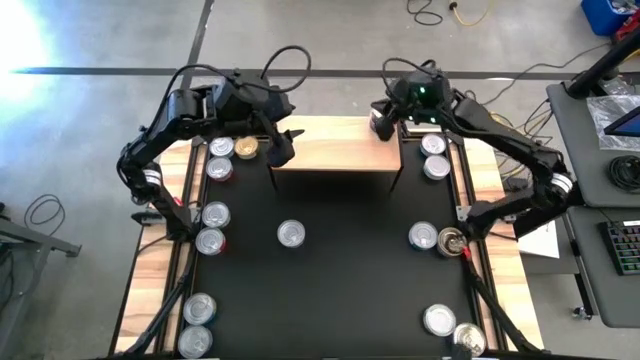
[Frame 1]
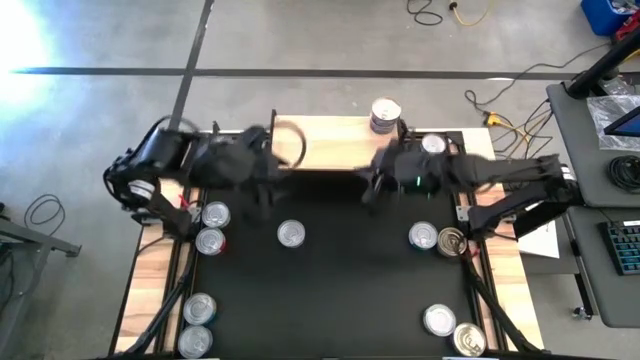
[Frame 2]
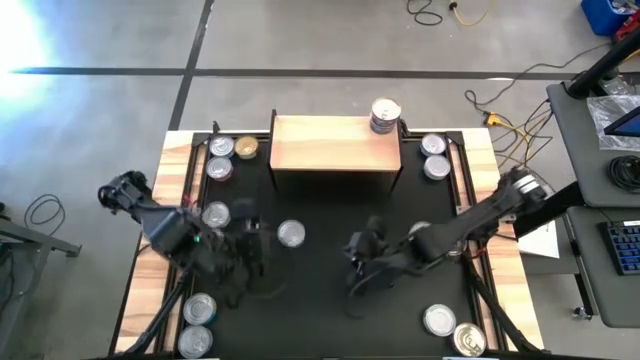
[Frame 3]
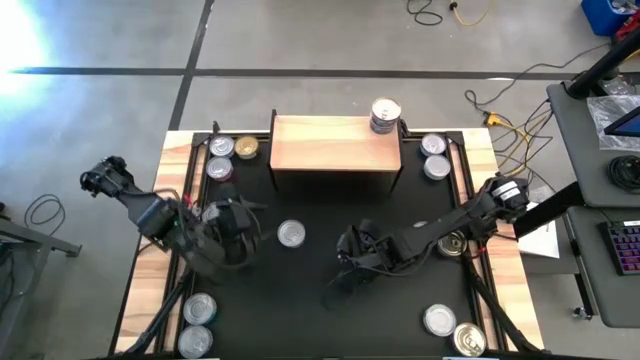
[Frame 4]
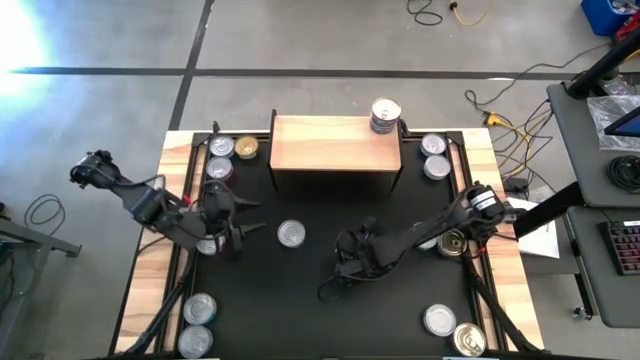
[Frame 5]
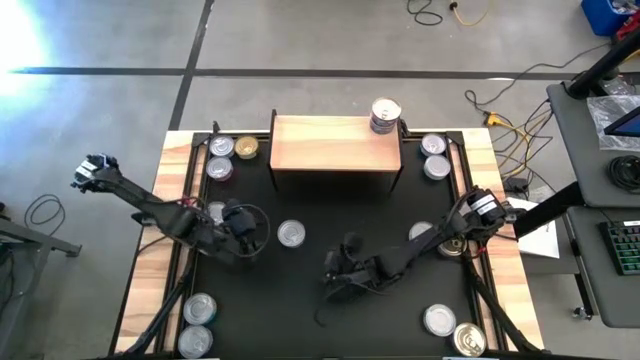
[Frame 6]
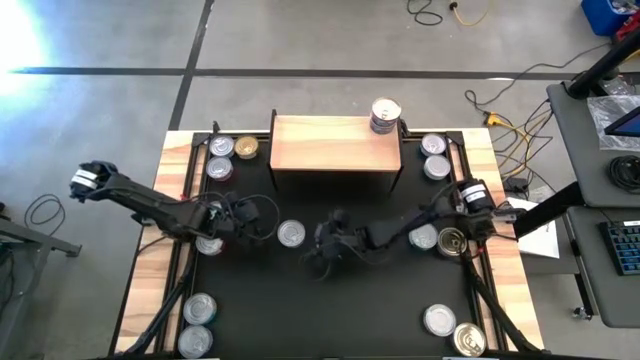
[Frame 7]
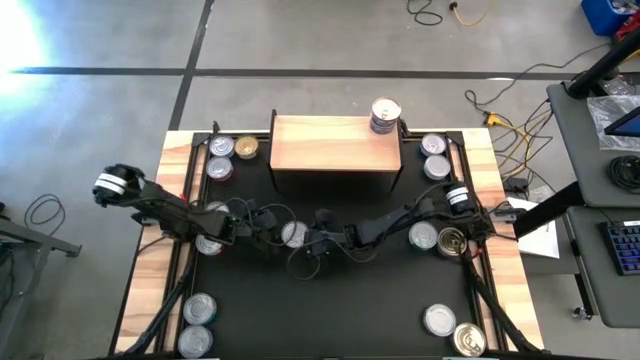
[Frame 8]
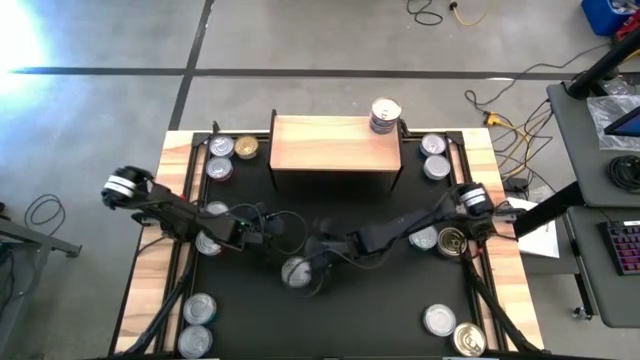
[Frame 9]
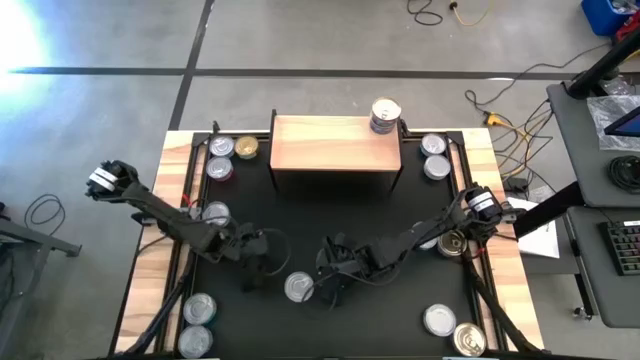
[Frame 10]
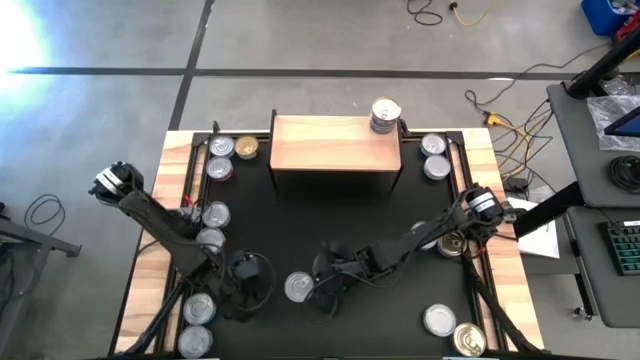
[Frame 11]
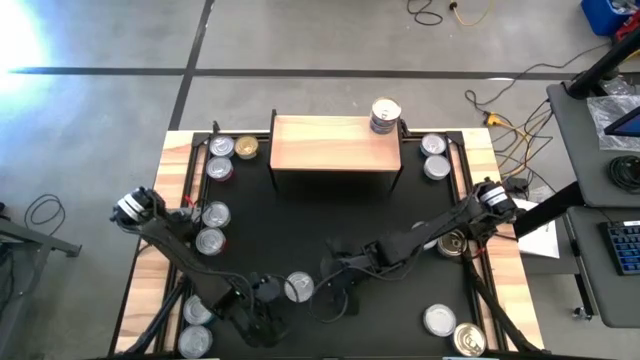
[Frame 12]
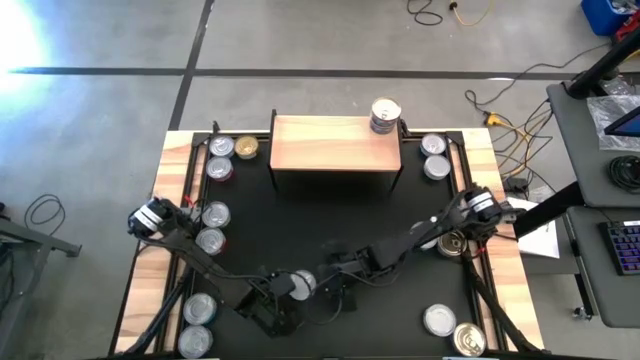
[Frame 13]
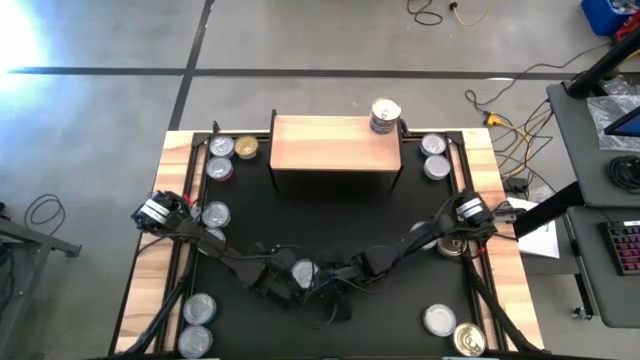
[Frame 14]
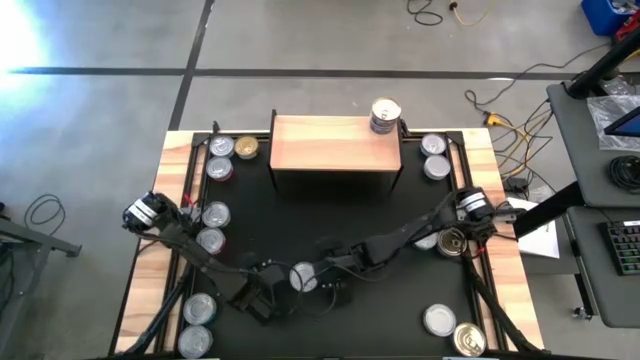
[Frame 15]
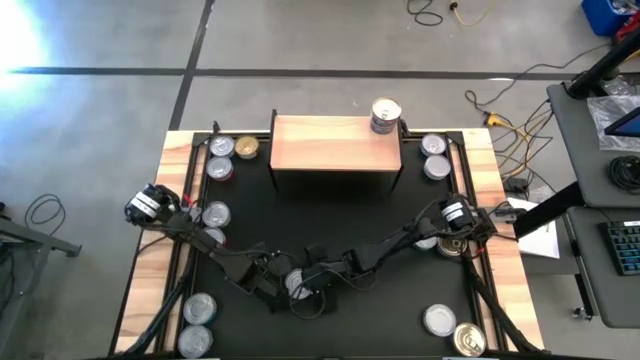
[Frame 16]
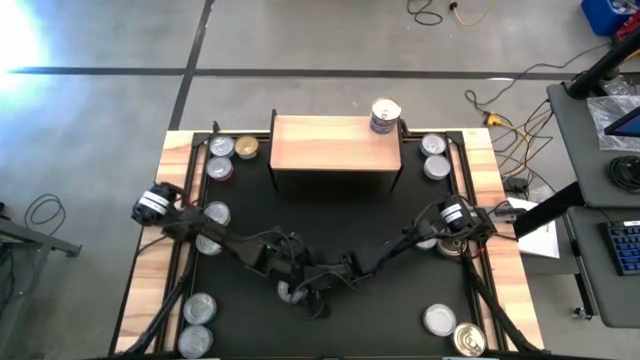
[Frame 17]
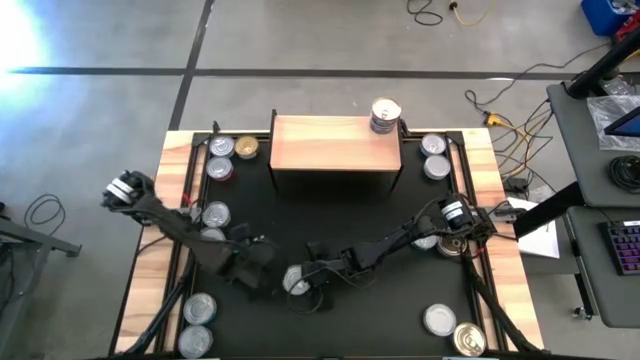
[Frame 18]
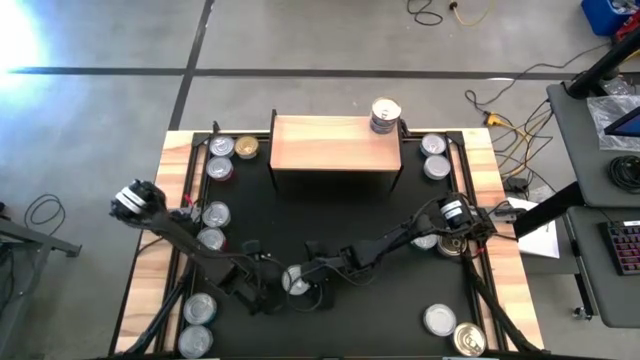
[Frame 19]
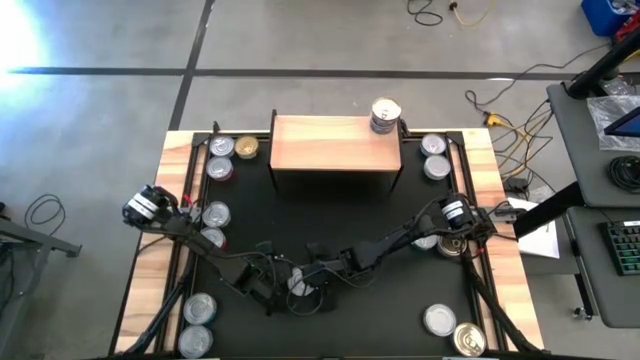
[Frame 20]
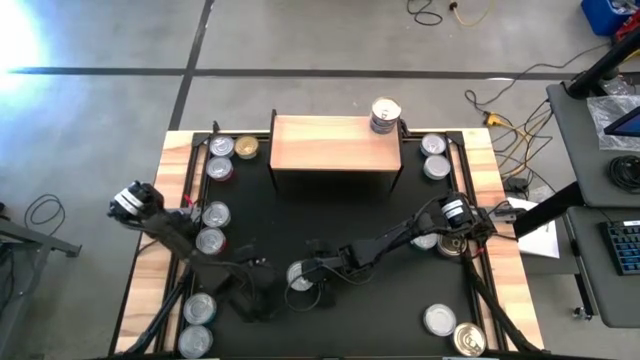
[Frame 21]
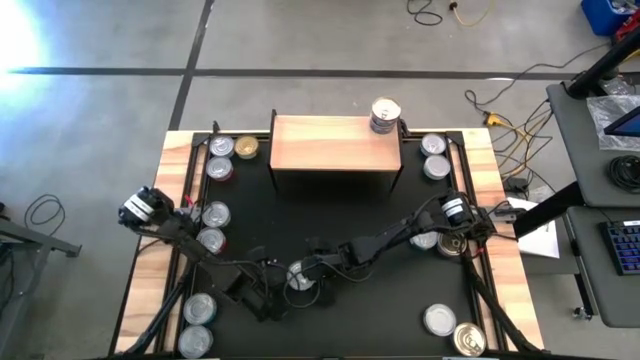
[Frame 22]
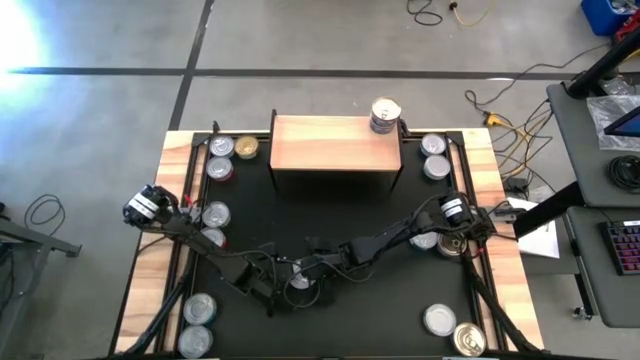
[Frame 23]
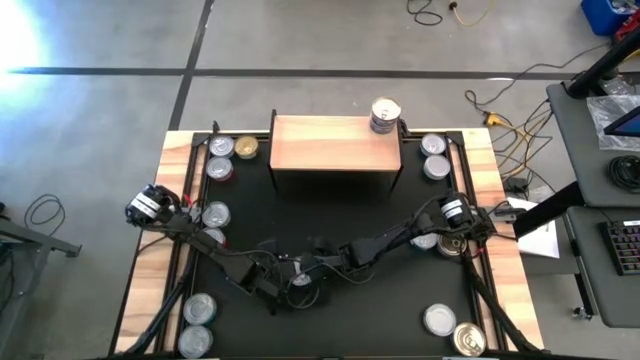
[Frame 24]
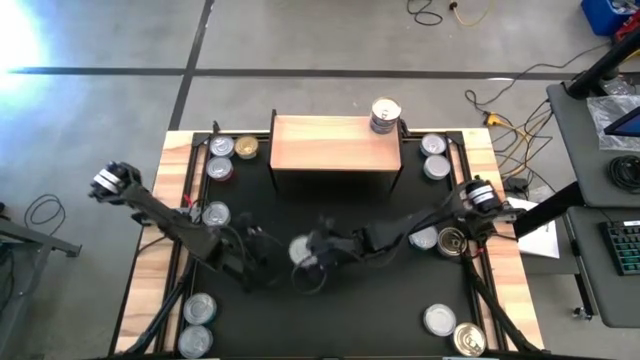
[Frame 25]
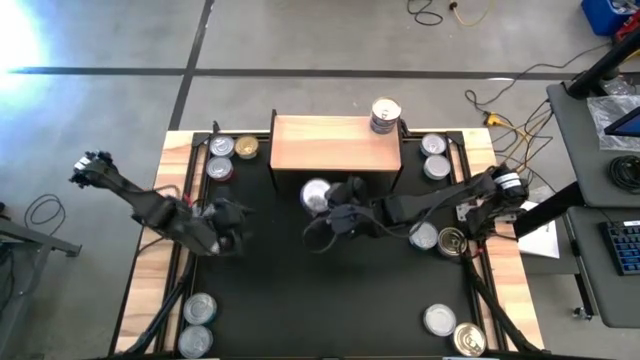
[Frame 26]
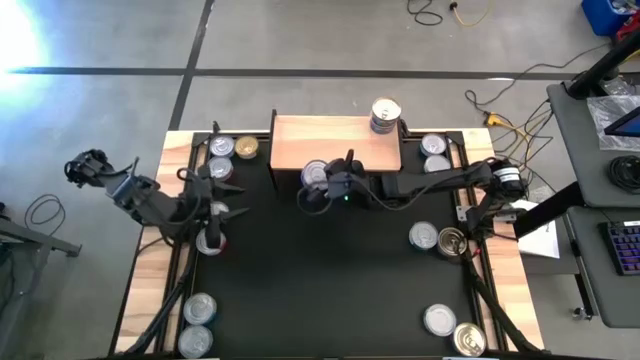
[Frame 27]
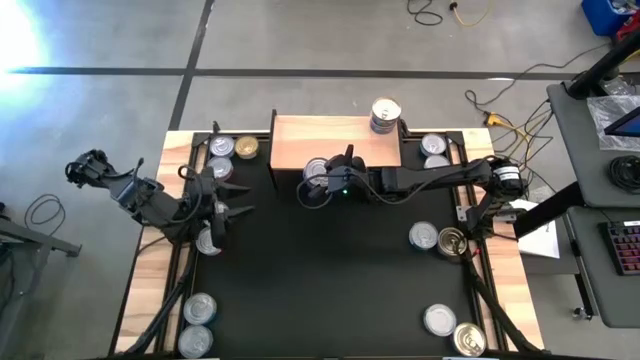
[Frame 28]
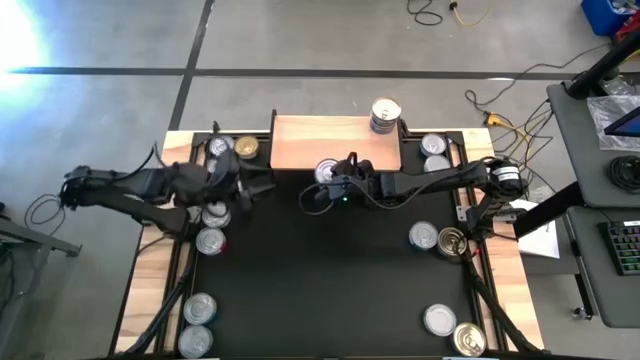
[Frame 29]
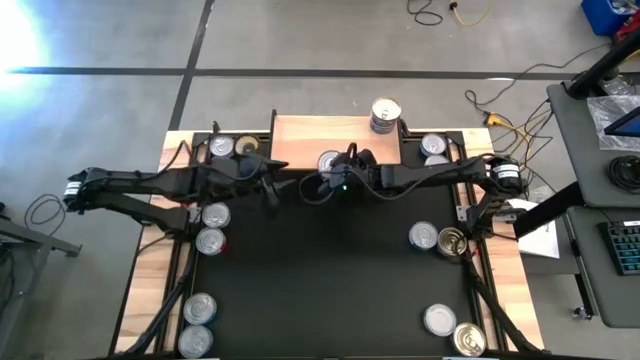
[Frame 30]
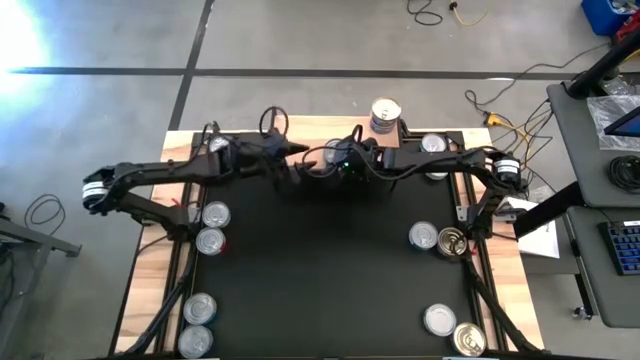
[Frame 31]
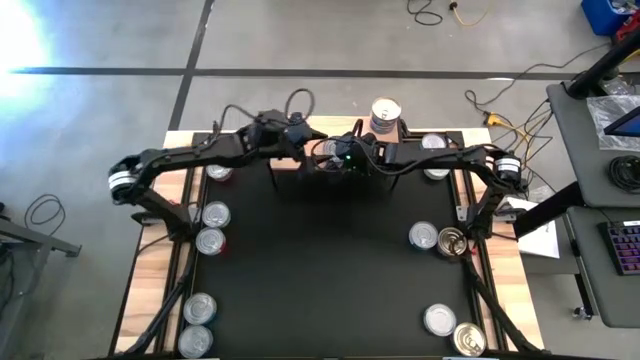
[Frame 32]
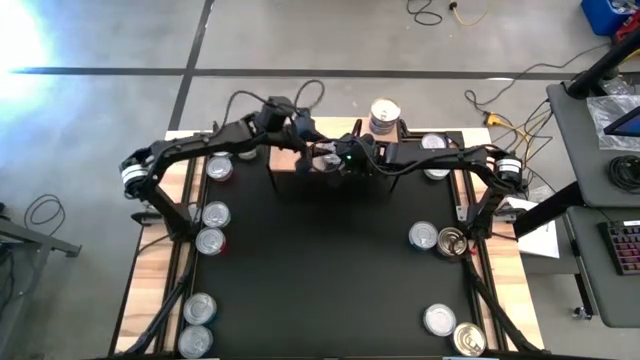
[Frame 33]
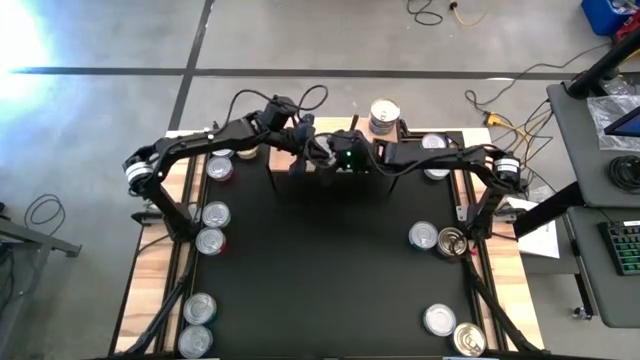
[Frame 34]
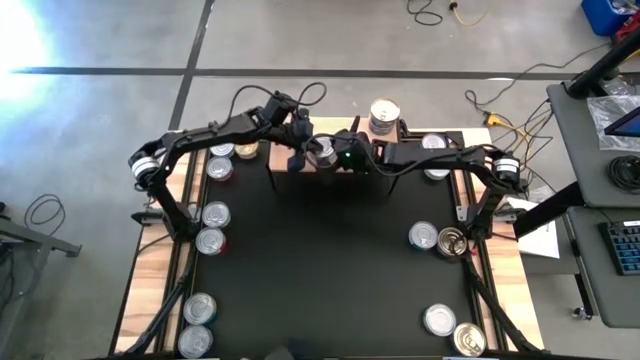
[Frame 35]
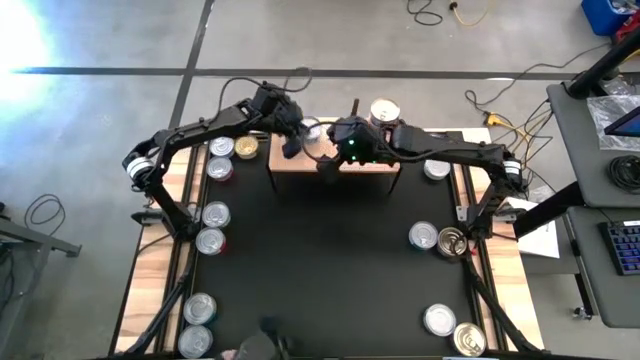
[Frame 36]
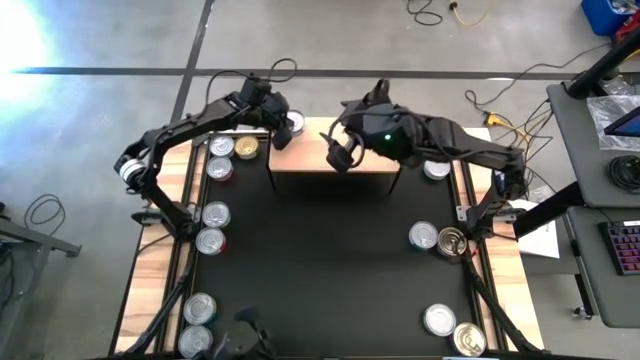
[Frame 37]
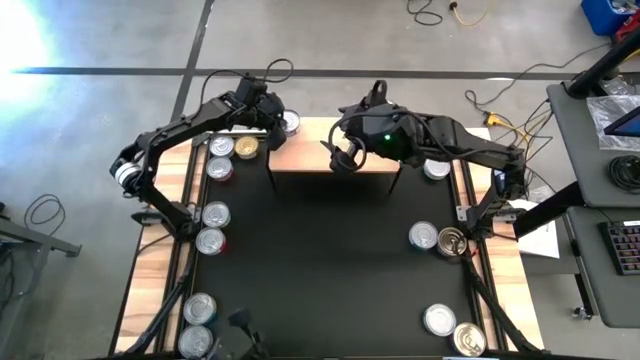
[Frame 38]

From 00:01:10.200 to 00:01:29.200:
Task: Stack canned seafood by type on shelf
Put the top blue tuna can on the shelf

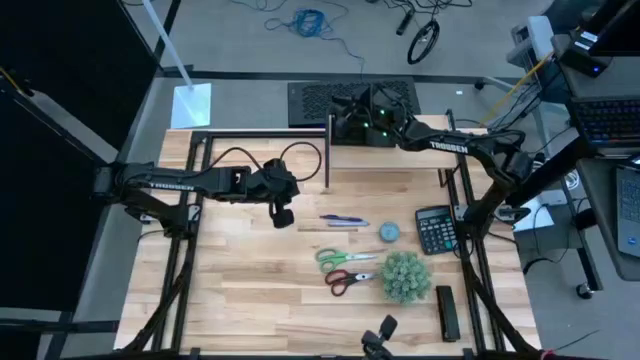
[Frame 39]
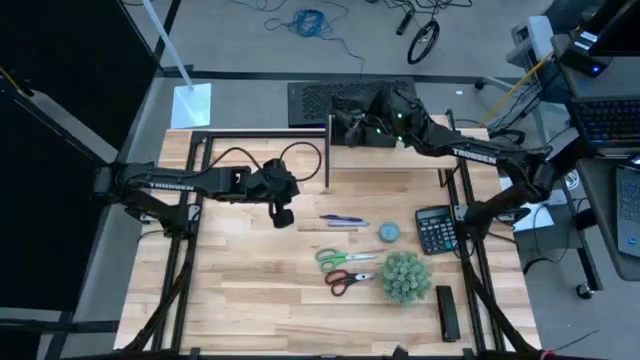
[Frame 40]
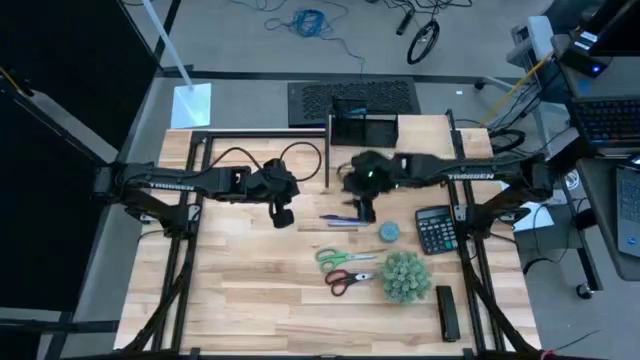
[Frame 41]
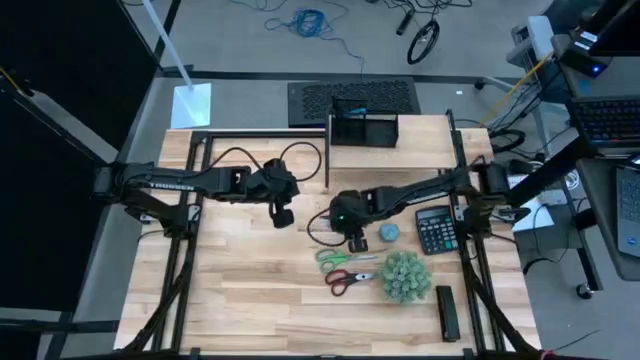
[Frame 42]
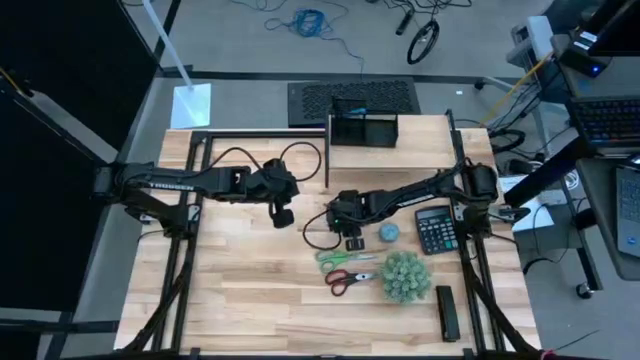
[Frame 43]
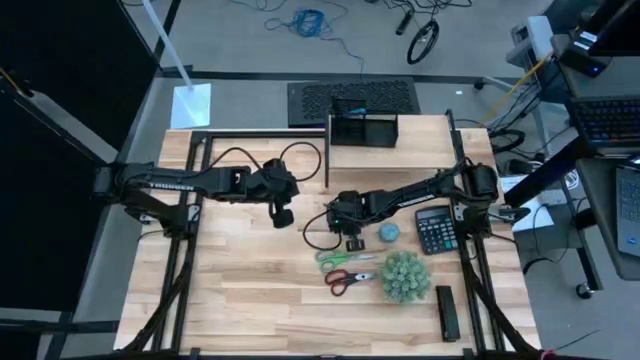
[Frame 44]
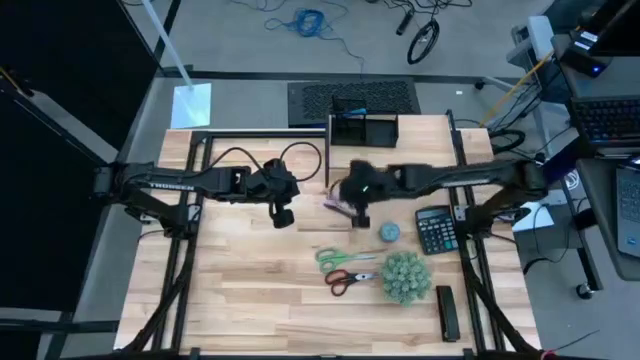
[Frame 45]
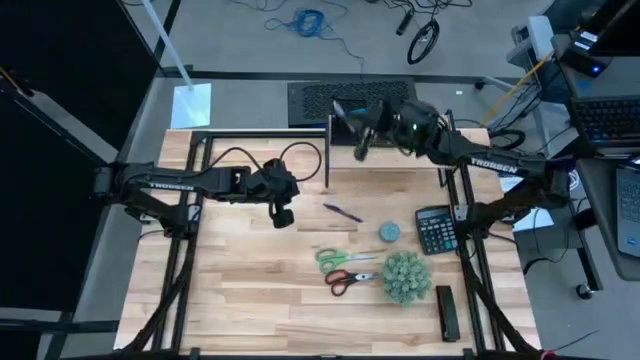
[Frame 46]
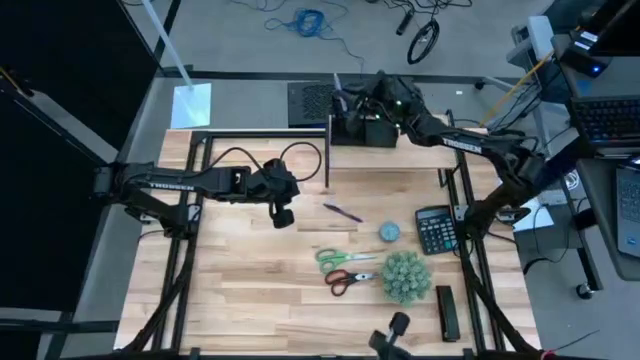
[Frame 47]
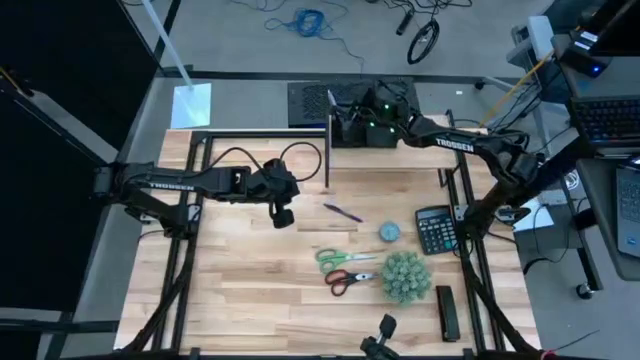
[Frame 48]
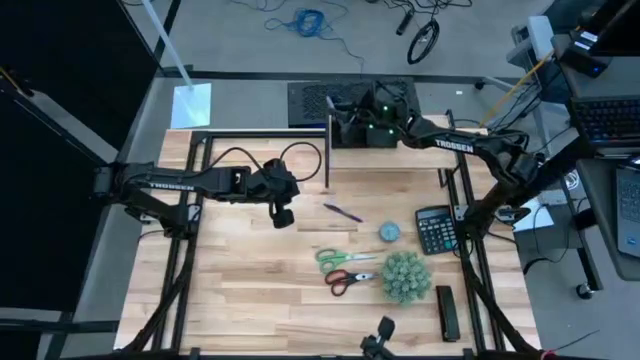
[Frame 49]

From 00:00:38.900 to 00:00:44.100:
Task: Pick and place office supplies into organizer
Put the purple pen into the black desk organizer on the shelf
